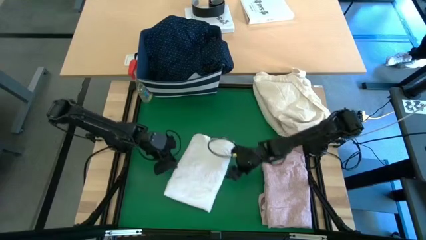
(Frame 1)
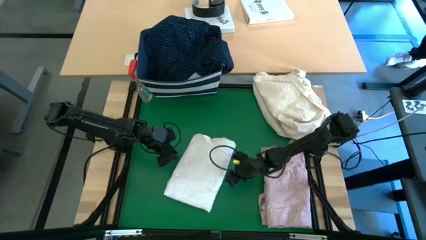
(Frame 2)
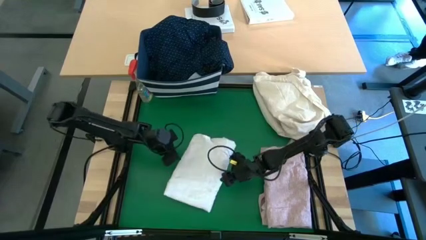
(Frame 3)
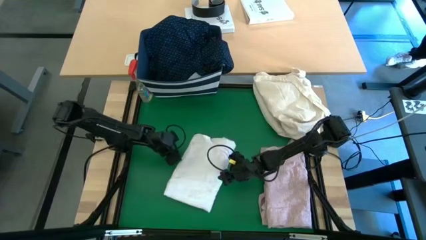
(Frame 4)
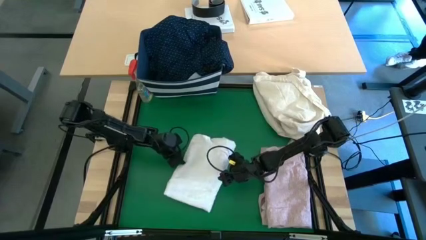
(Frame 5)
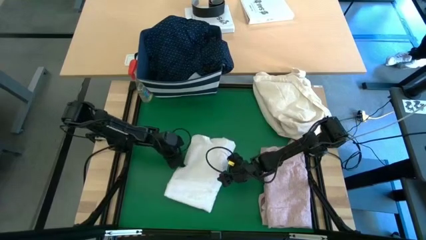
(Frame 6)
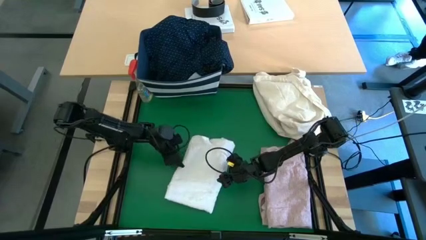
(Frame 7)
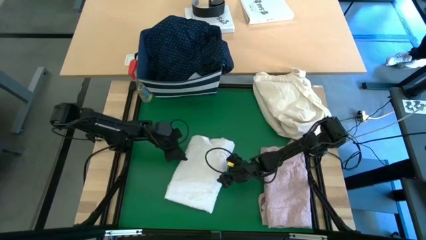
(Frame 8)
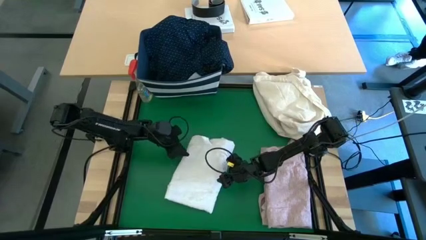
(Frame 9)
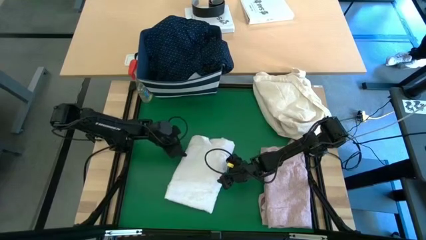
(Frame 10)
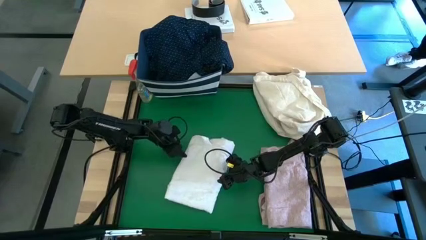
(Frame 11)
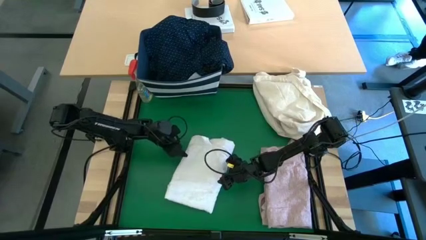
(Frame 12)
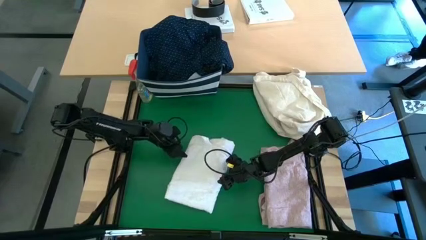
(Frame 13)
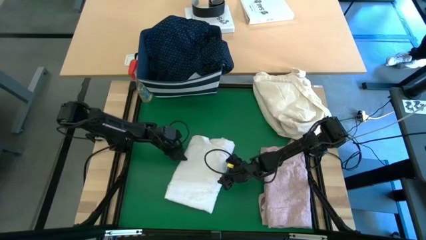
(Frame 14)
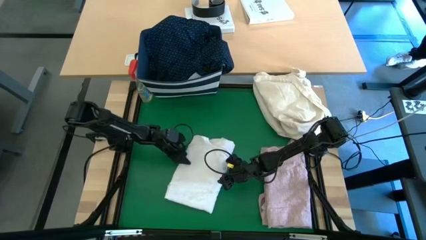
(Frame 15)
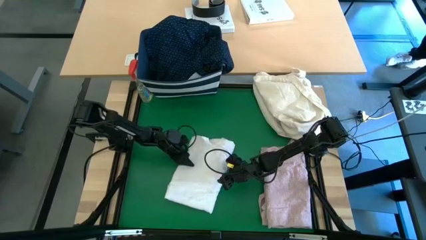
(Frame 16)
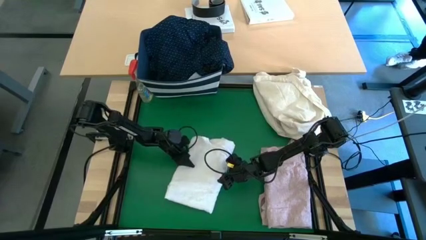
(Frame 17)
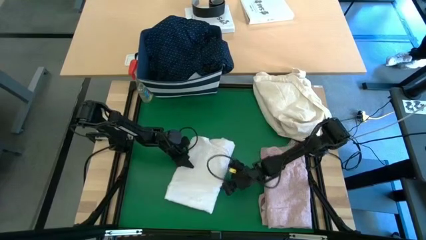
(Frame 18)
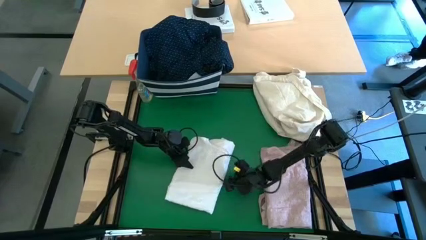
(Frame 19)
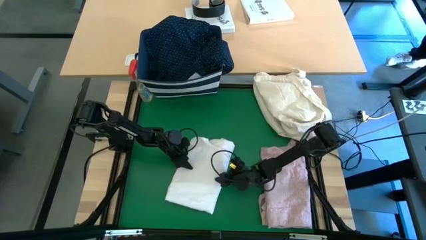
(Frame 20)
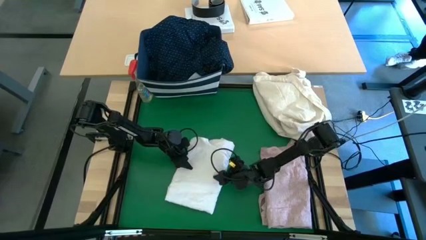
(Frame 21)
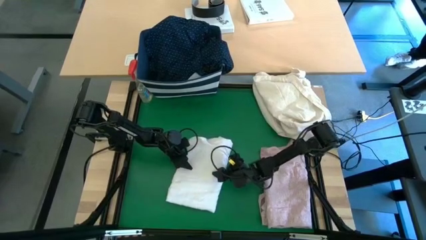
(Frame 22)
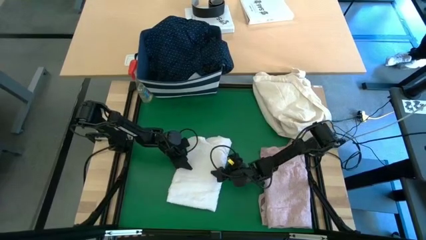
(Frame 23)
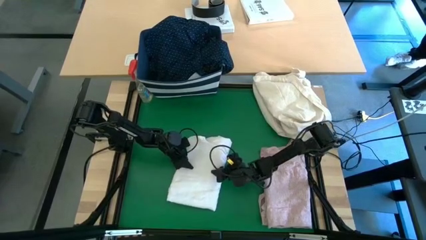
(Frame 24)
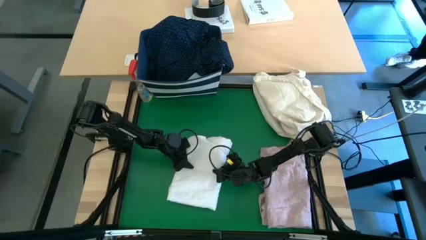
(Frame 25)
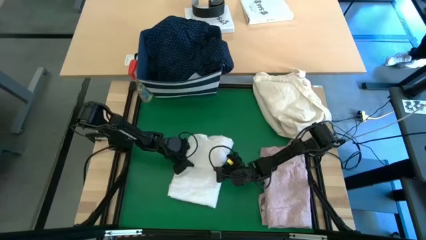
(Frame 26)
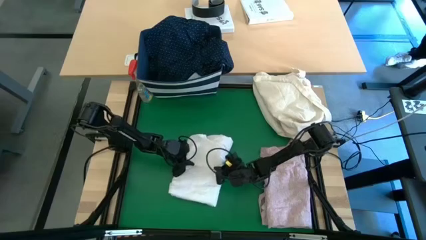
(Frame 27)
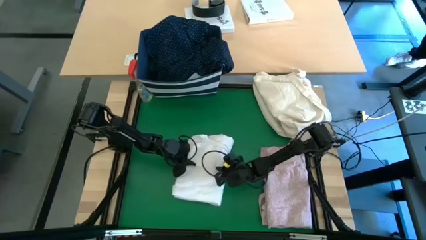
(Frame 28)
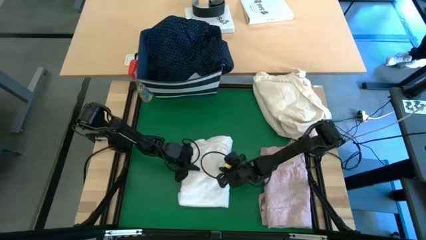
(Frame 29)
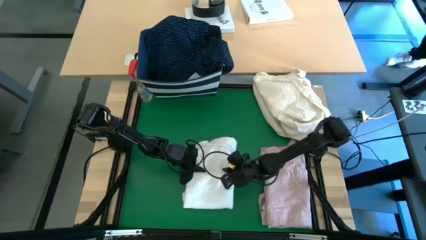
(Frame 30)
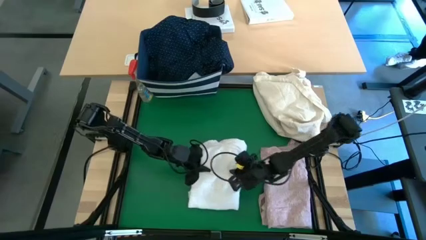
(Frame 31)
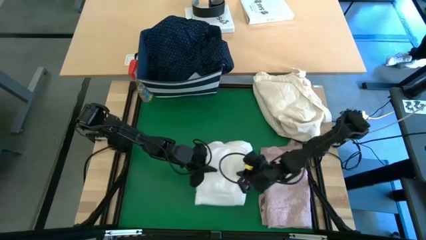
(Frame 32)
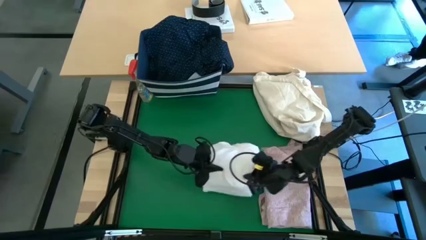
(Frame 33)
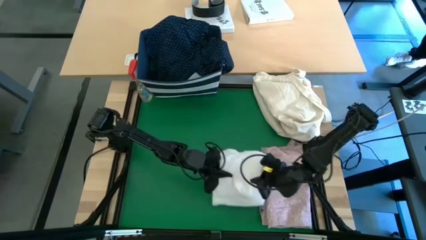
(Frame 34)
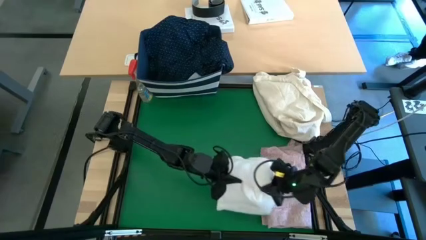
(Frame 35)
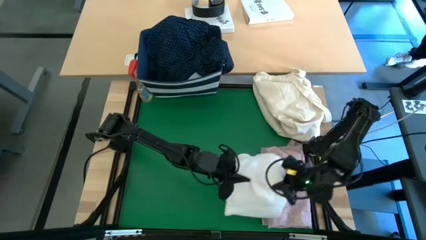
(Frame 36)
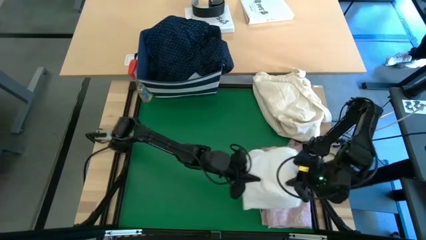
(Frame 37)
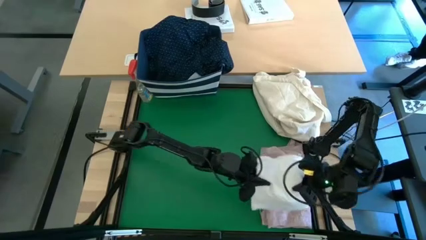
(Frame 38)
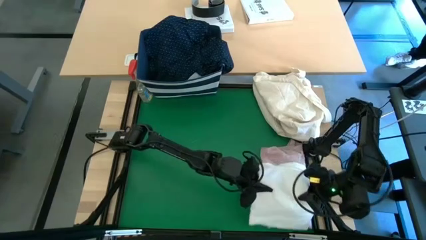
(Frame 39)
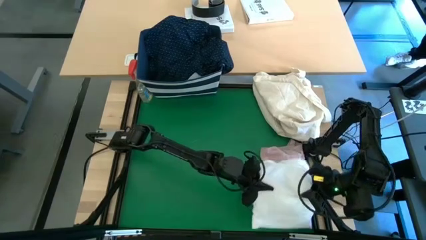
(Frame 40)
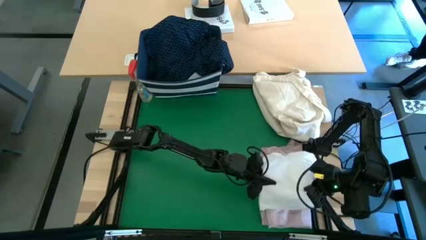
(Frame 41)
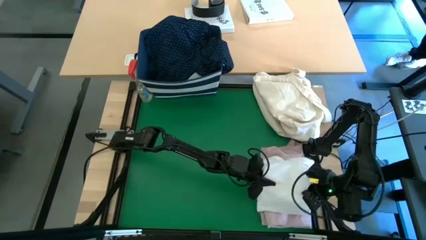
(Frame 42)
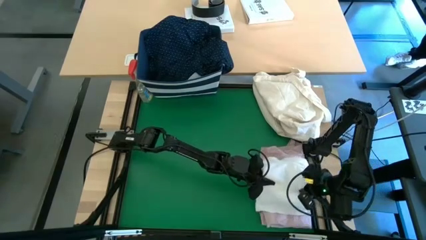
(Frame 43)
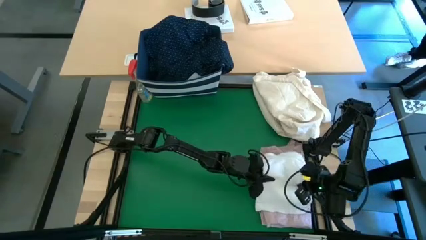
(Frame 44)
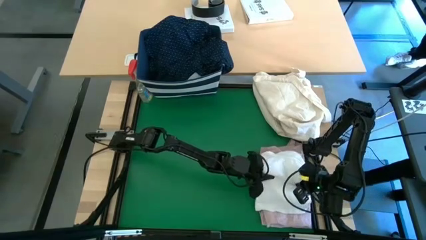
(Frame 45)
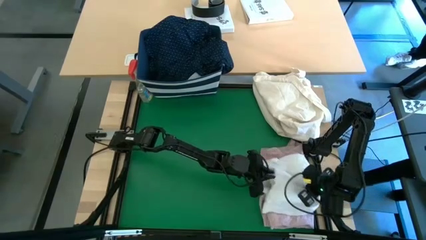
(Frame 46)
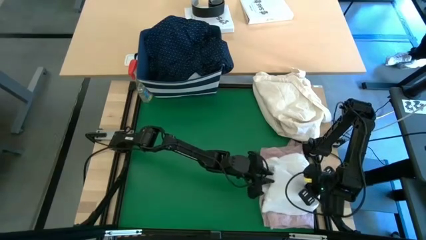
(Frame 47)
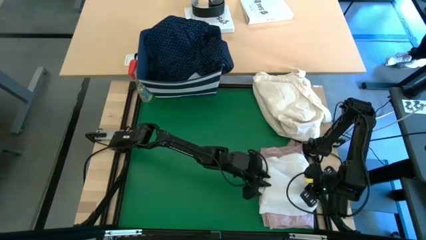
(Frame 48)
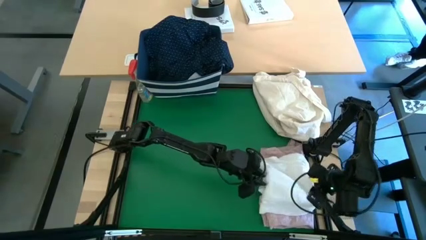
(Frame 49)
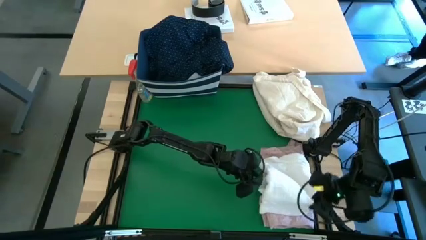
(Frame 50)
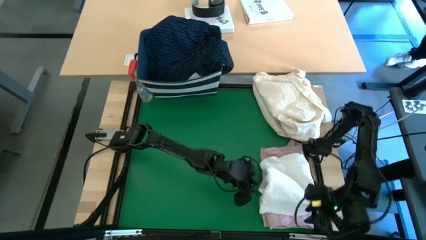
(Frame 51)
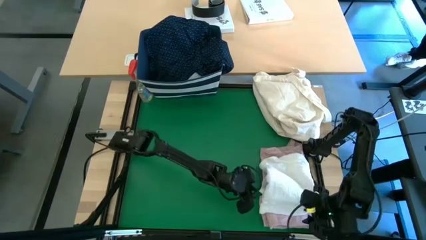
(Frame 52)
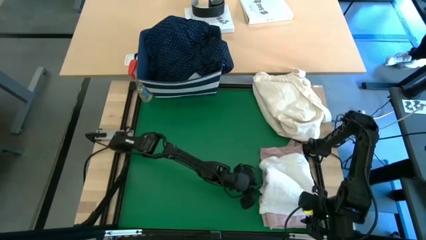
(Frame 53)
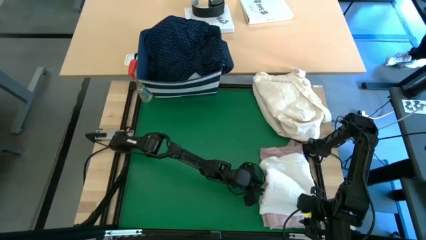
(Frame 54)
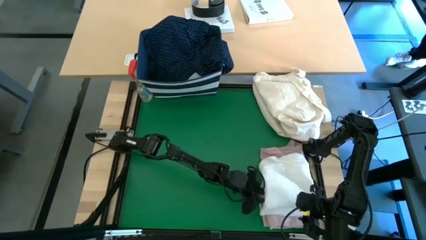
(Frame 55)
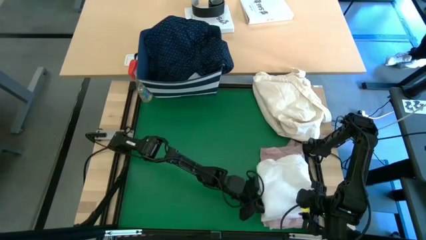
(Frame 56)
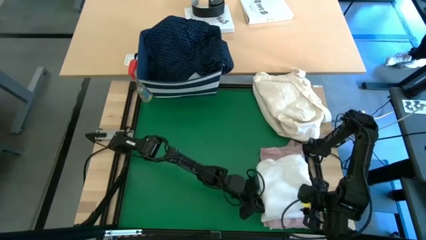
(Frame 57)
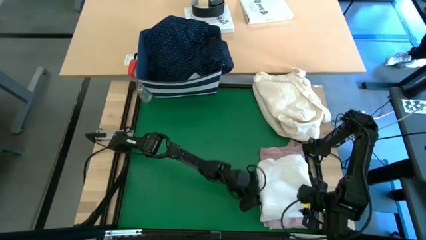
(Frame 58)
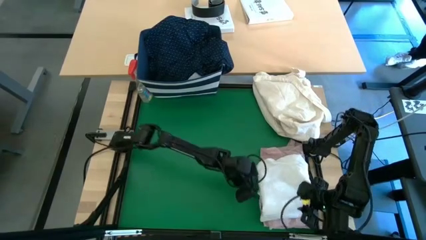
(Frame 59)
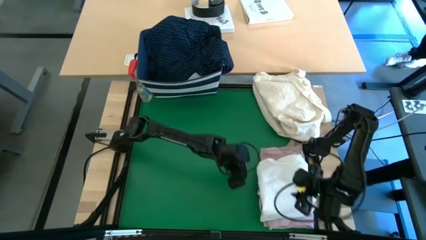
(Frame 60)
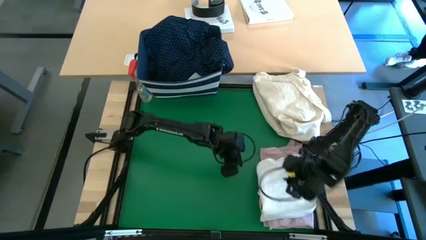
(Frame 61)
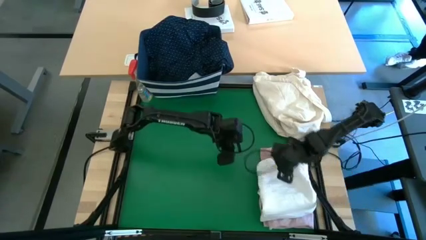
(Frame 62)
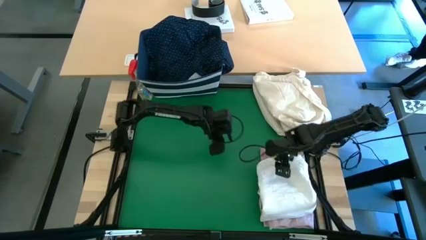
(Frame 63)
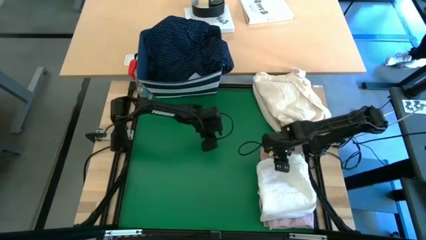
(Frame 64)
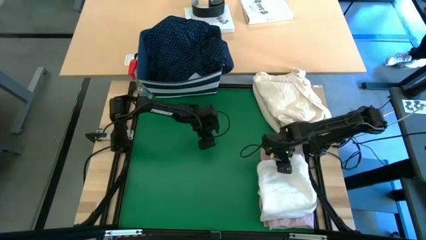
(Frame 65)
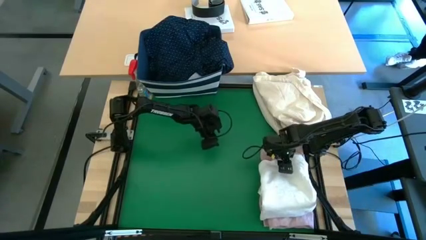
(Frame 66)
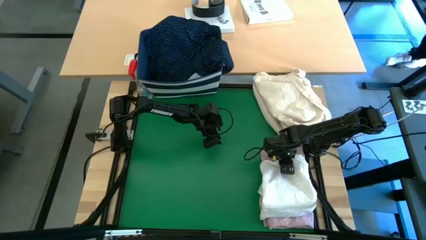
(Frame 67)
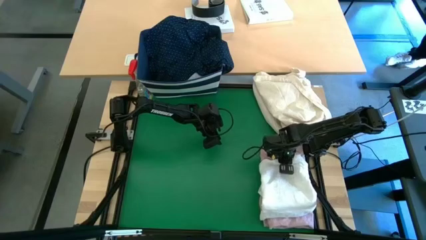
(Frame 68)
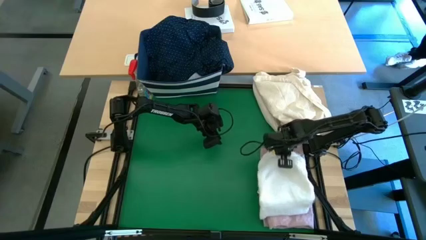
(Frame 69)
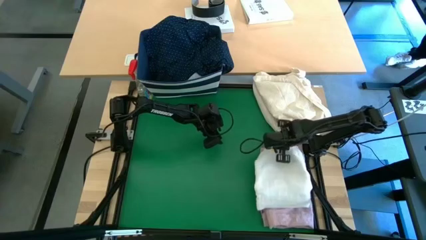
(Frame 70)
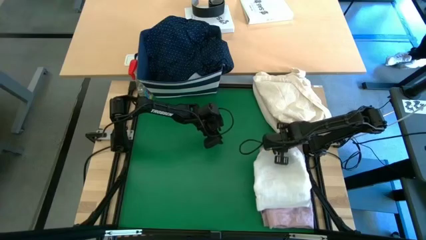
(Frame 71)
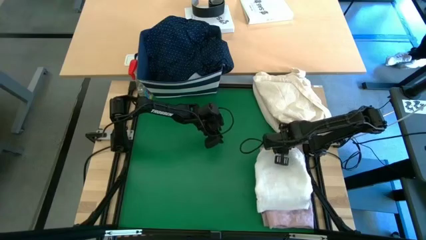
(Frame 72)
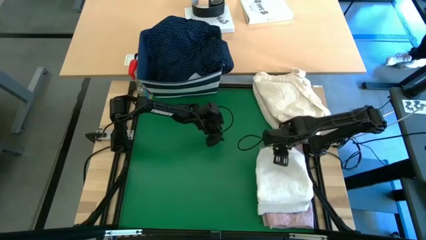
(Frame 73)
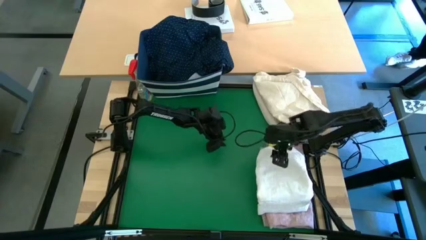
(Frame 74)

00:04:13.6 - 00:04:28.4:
Task: Fold laundry
Stack the white polo on top of the red polo

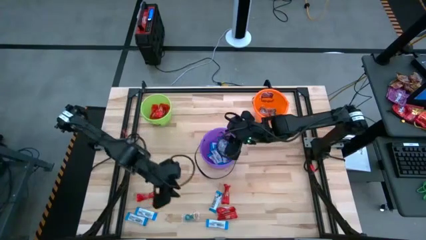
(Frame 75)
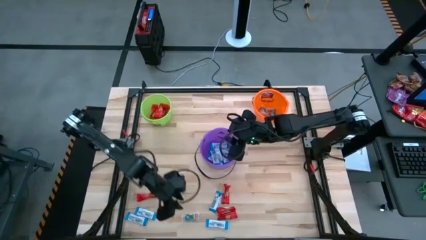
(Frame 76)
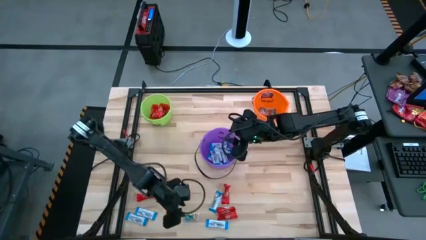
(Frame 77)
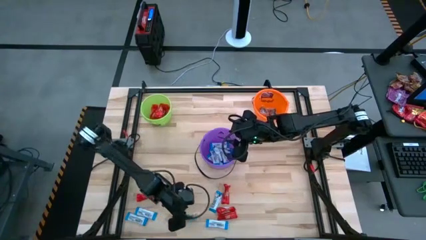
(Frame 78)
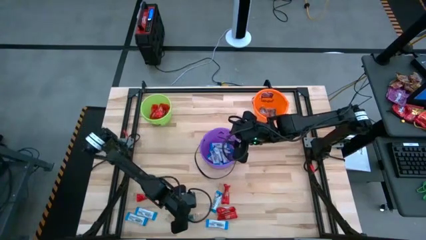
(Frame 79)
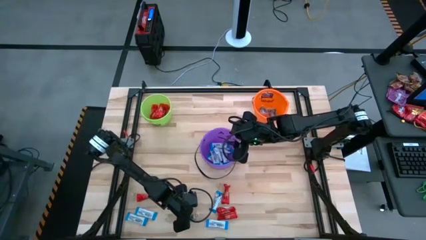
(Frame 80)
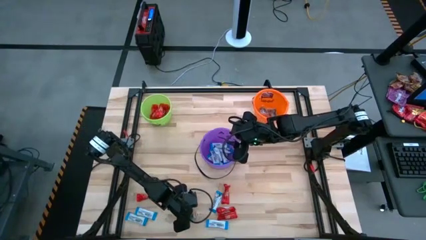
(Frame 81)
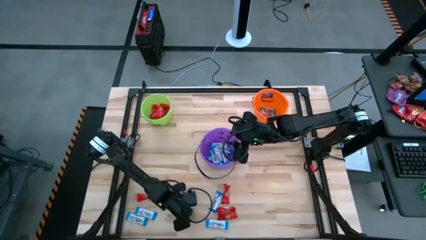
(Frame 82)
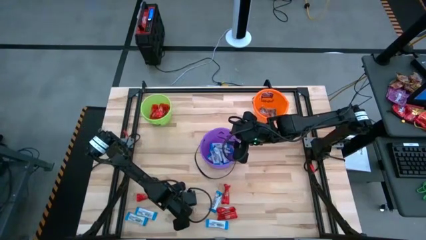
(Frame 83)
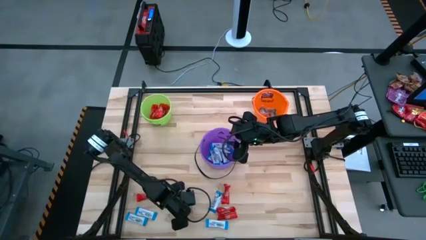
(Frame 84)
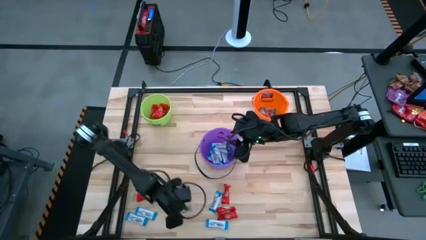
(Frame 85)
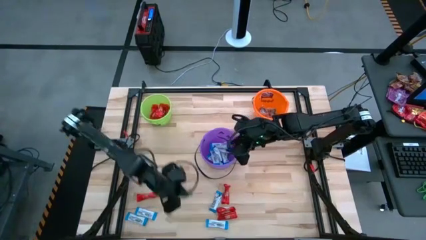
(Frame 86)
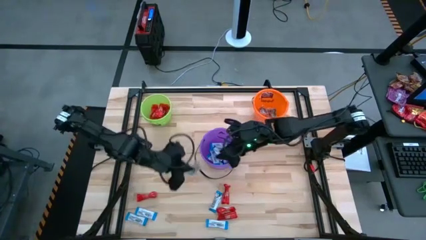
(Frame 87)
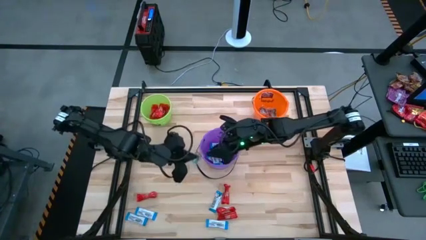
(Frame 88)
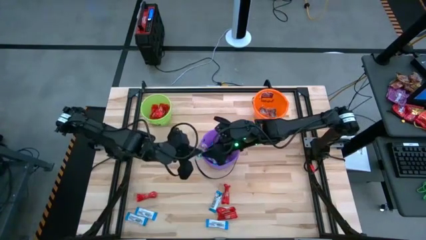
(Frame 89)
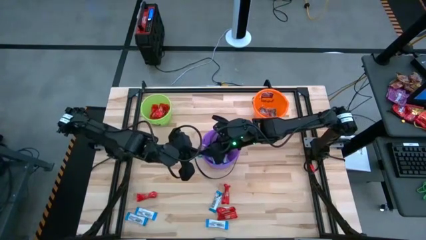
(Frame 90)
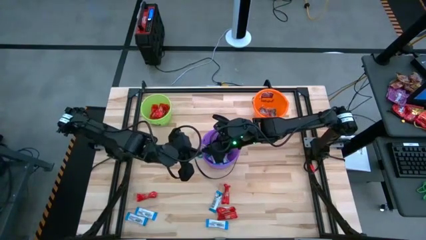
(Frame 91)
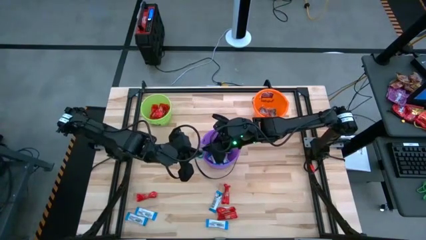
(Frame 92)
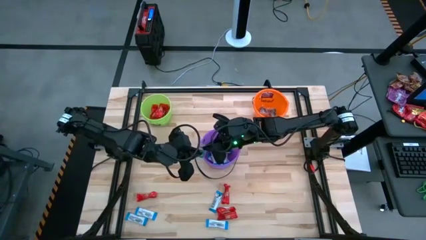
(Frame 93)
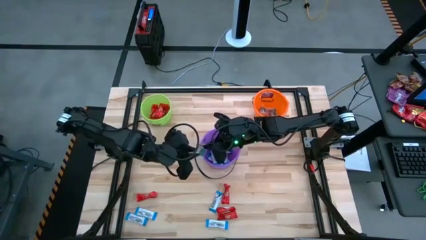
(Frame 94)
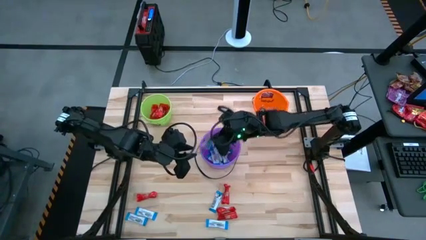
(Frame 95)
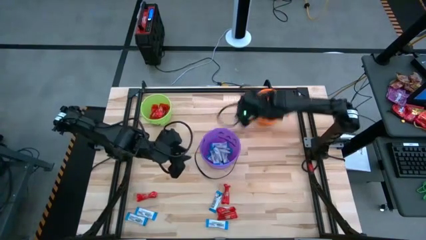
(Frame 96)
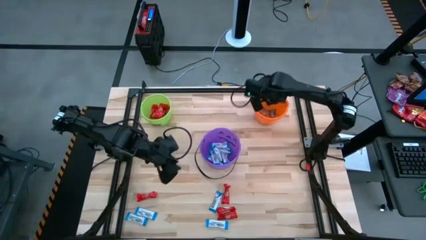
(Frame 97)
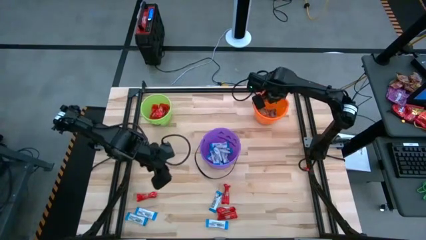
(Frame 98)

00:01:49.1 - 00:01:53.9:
Task: Sort candy by brand, put in halloween buckets
Put the blue gummy into the orange bucket
